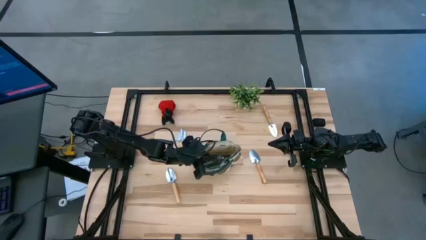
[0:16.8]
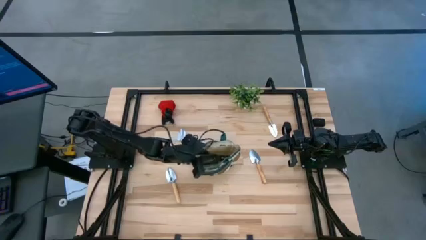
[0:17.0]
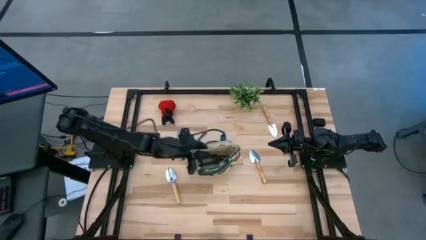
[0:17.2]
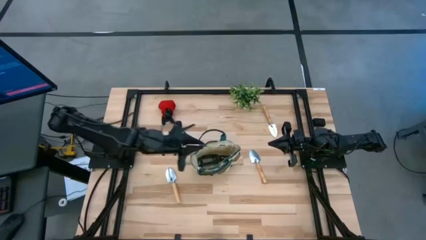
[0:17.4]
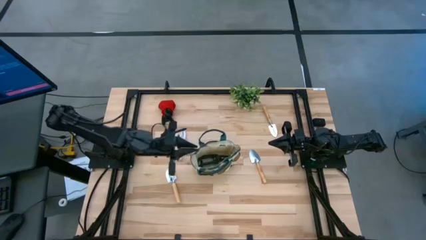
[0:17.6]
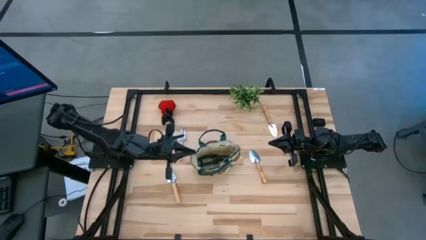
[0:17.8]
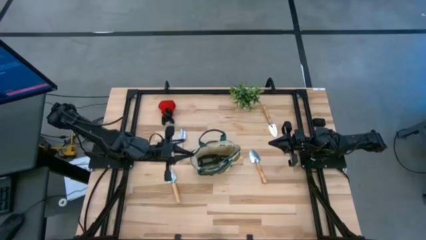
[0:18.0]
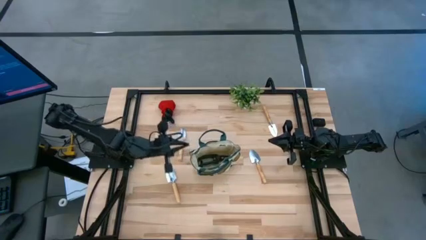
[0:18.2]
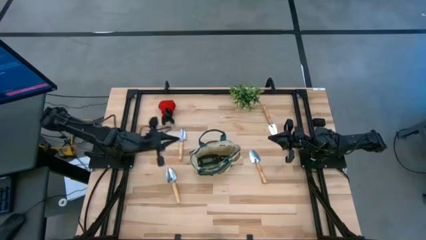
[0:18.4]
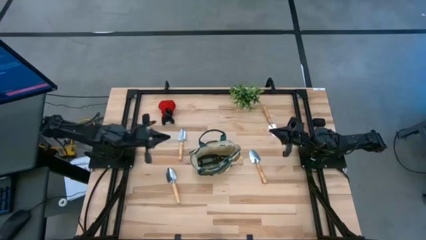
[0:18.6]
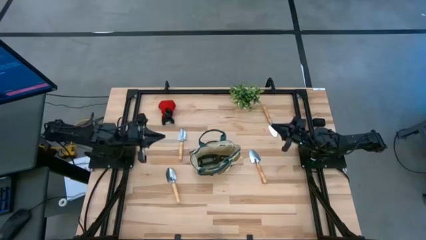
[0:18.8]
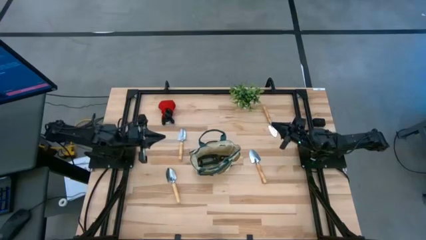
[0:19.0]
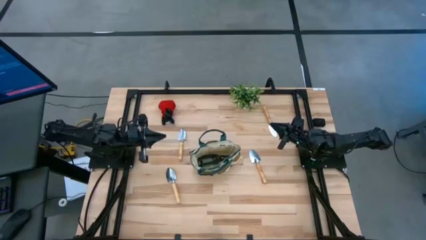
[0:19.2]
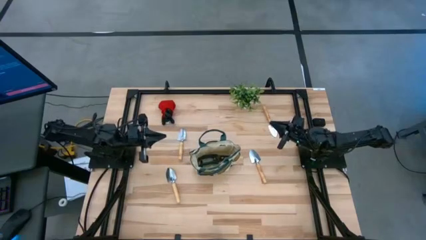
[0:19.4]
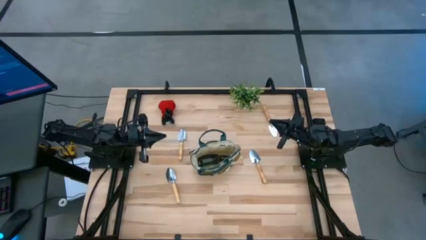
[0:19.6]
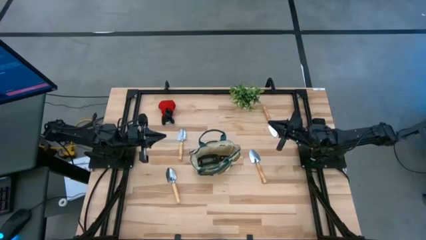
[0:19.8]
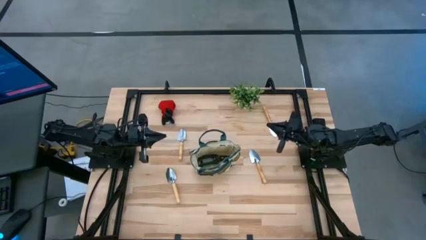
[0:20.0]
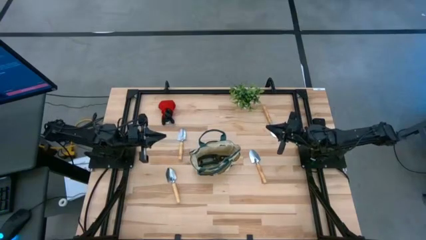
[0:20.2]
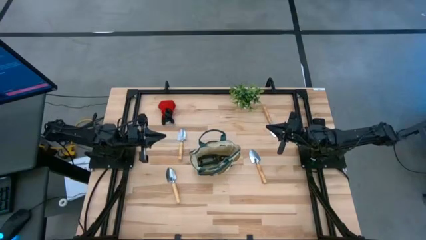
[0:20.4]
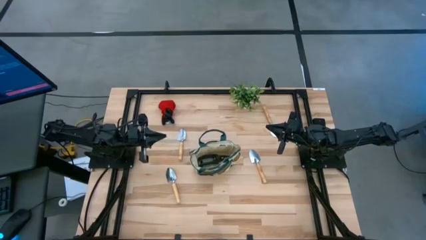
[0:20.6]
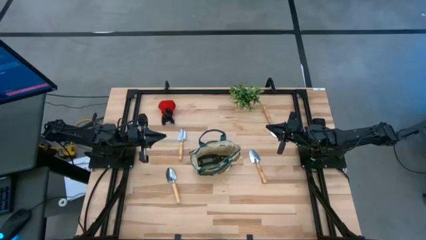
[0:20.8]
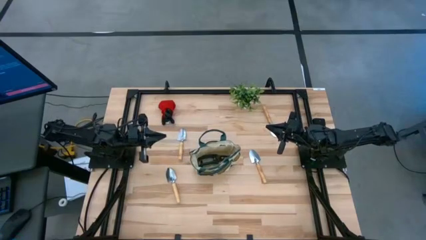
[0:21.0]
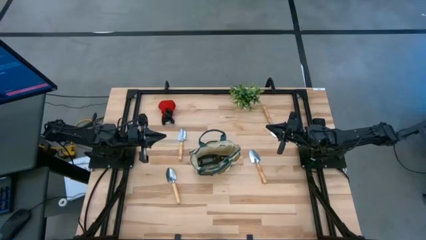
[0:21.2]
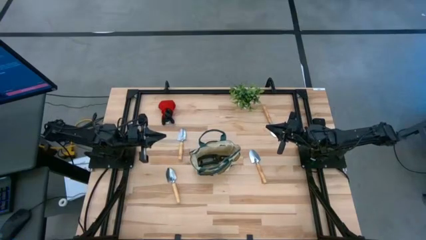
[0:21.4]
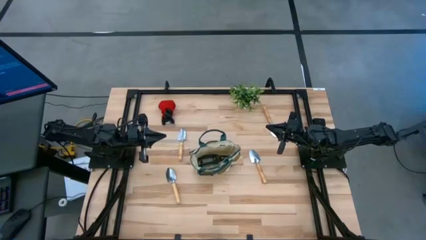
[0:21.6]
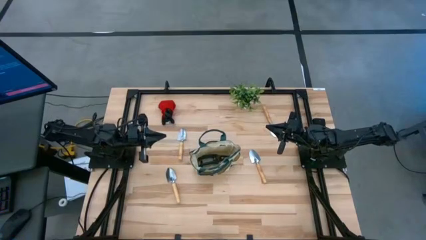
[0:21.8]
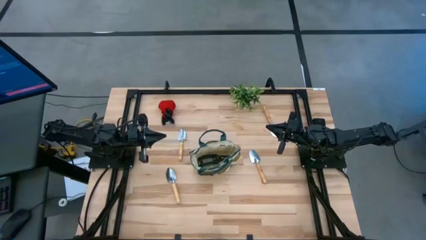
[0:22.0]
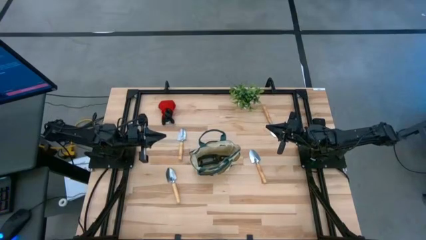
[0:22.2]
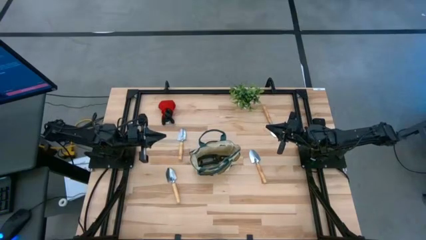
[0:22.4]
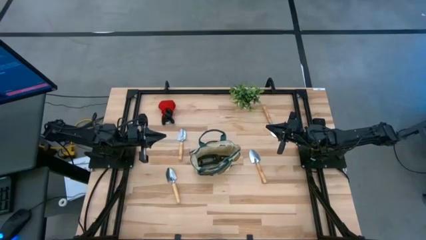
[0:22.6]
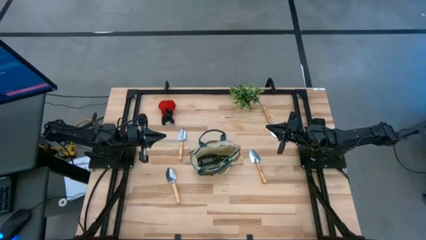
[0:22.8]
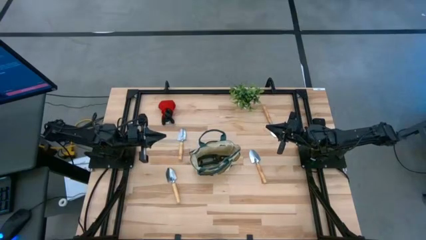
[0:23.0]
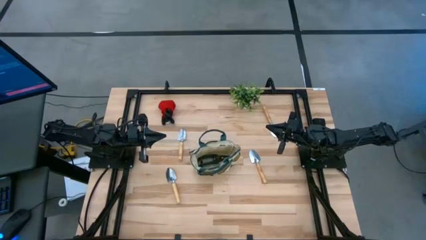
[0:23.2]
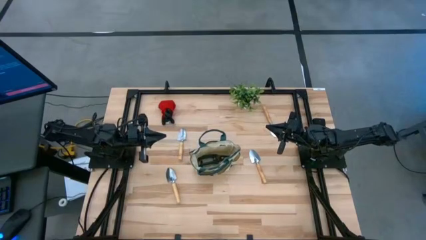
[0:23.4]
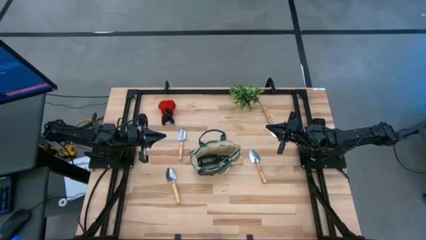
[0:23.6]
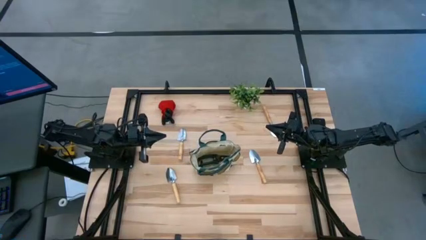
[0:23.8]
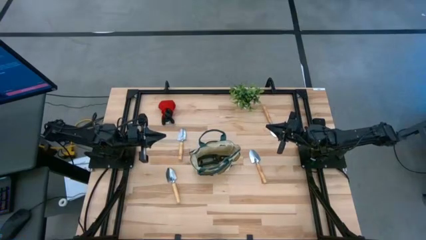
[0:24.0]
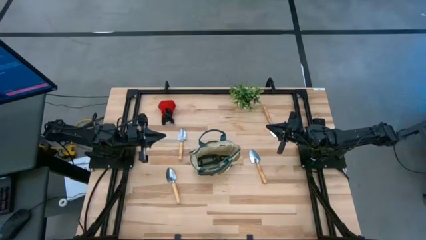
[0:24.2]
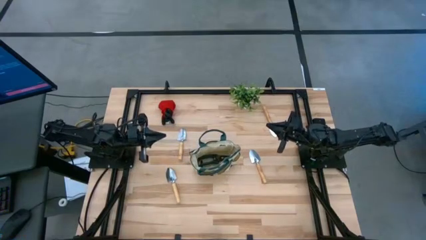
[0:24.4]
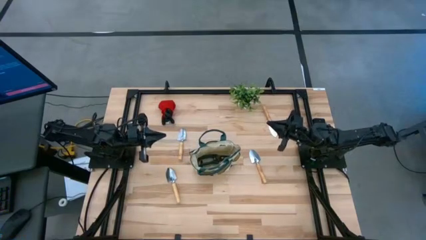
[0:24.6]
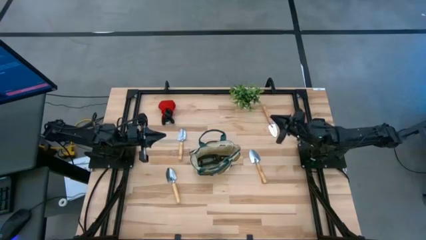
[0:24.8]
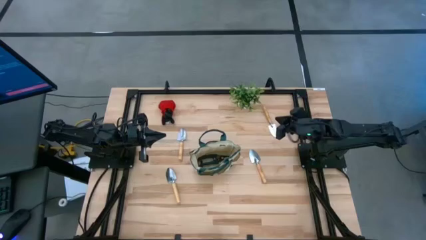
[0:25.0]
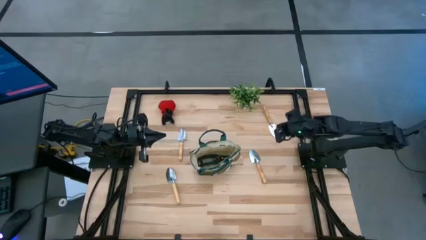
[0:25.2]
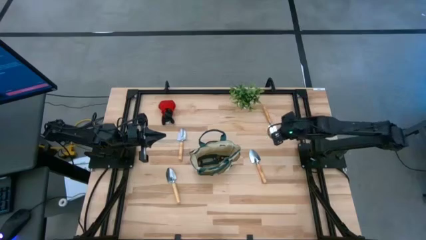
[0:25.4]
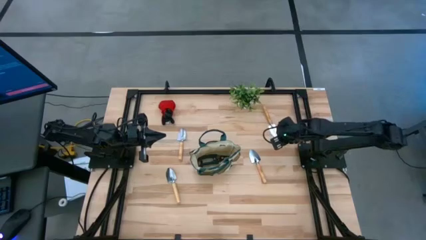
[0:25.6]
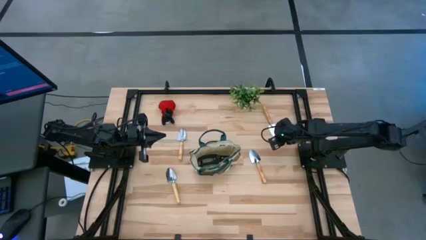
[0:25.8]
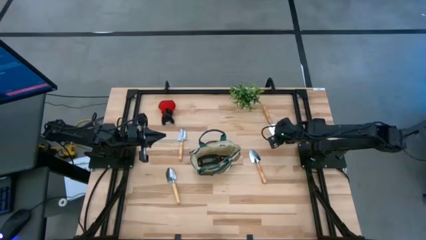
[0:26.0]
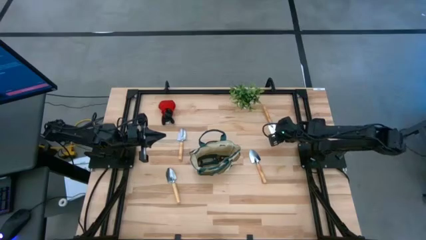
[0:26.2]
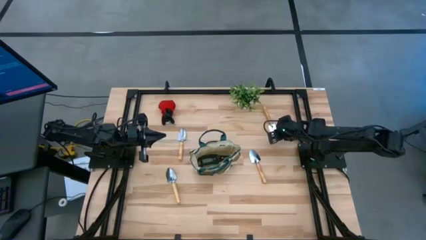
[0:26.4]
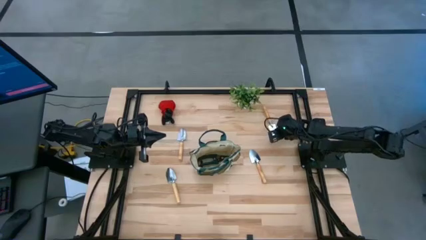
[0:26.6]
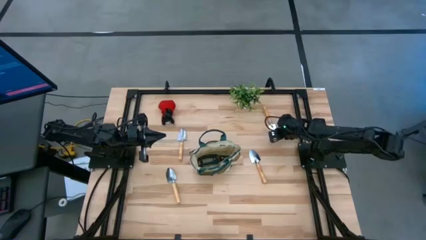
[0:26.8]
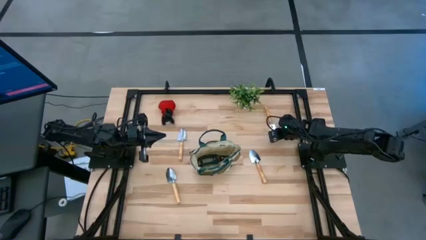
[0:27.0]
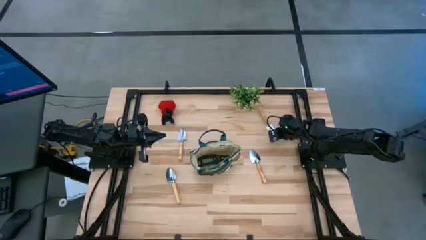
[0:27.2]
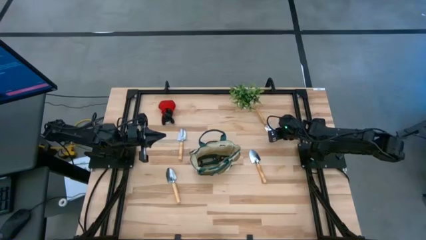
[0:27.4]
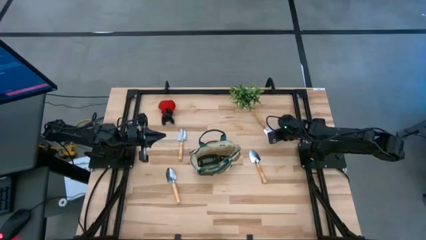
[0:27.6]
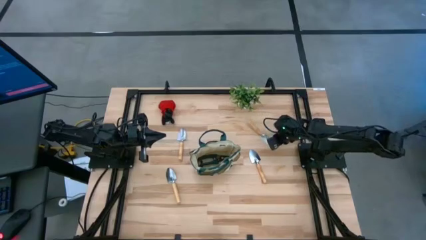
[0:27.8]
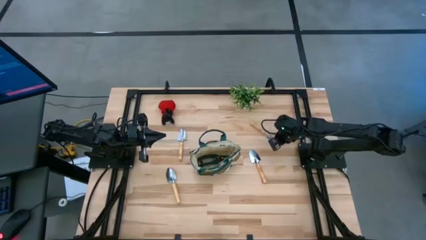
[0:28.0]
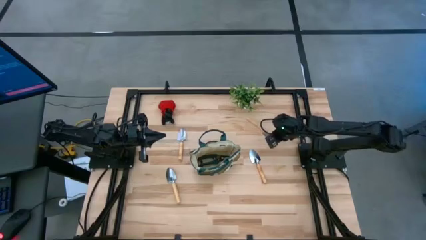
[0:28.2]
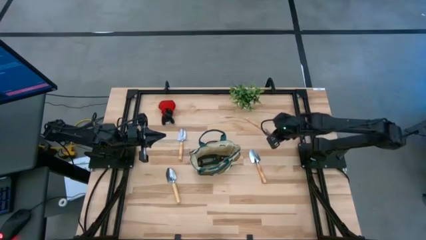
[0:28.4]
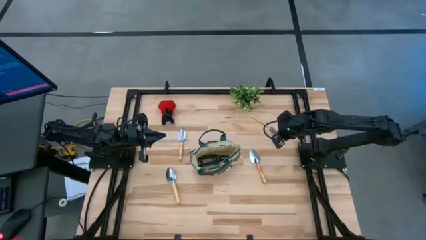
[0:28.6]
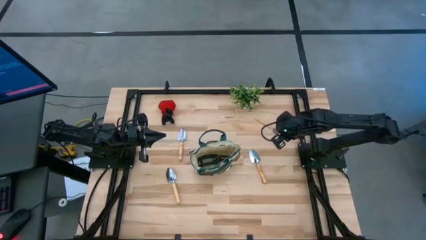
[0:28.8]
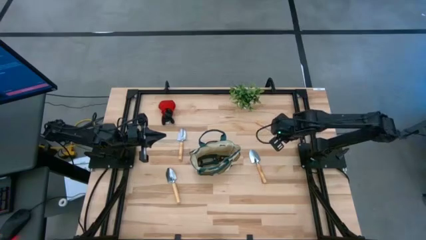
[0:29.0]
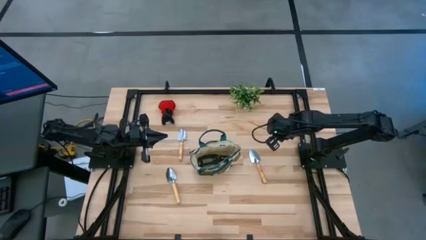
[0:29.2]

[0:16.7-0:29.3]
Task: Pick & Place Garden tools in Gardening bag
Put the brown trowel into the gardening bag
